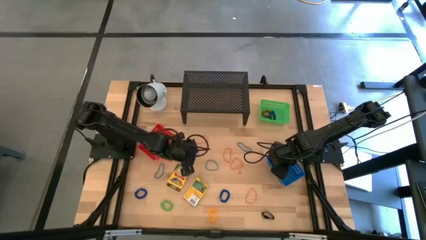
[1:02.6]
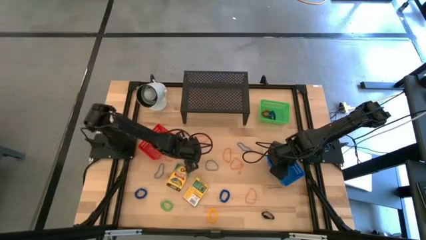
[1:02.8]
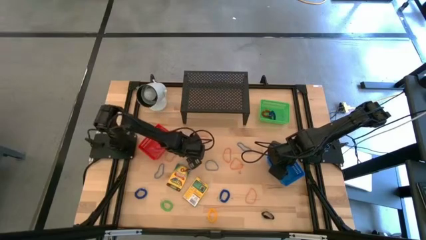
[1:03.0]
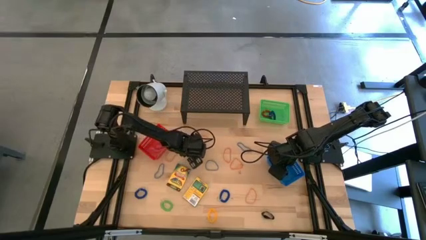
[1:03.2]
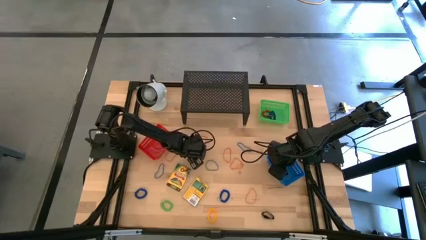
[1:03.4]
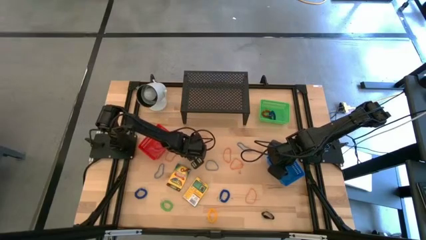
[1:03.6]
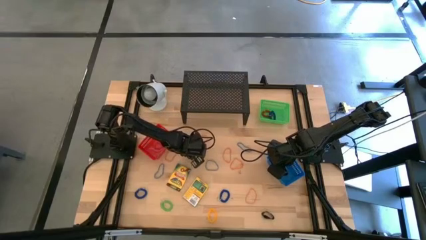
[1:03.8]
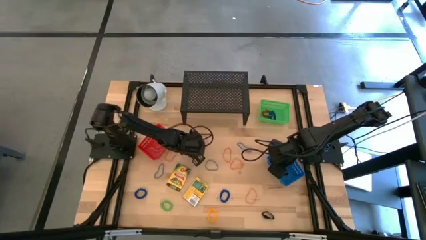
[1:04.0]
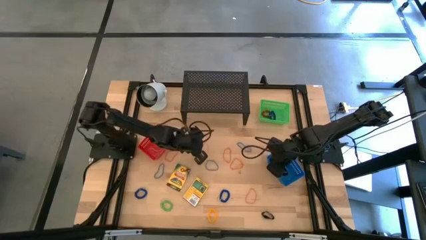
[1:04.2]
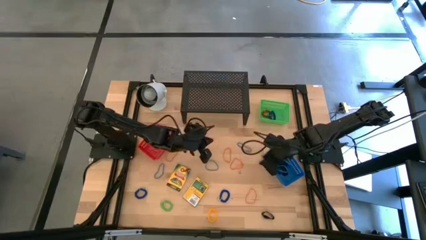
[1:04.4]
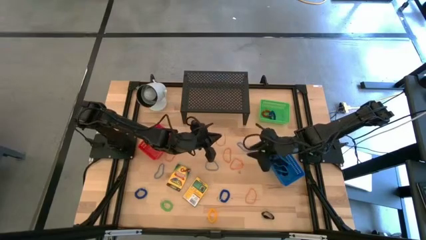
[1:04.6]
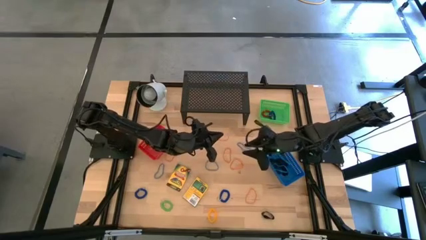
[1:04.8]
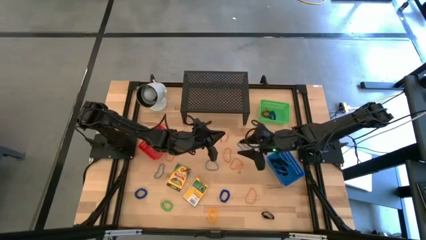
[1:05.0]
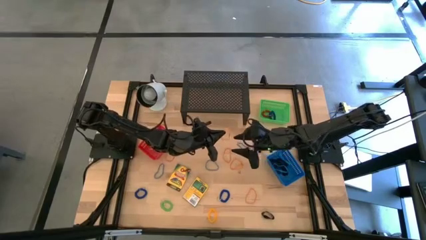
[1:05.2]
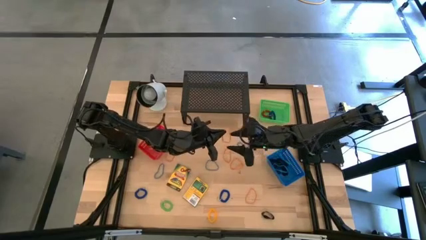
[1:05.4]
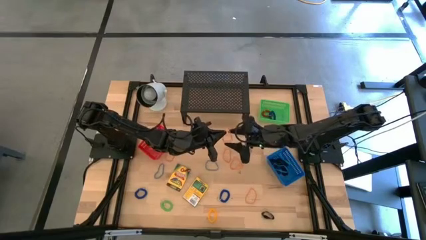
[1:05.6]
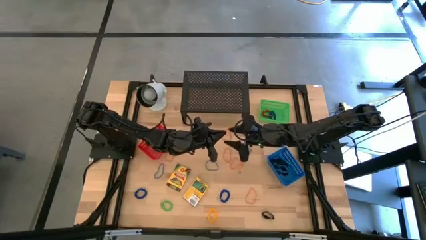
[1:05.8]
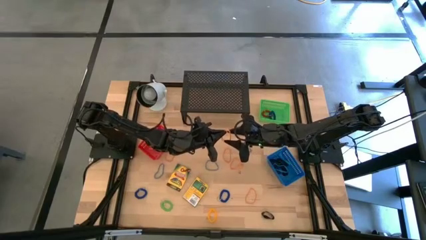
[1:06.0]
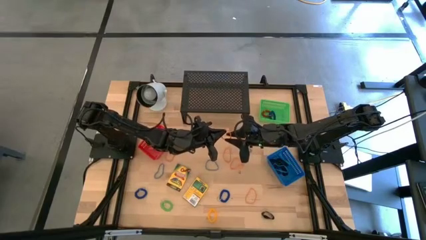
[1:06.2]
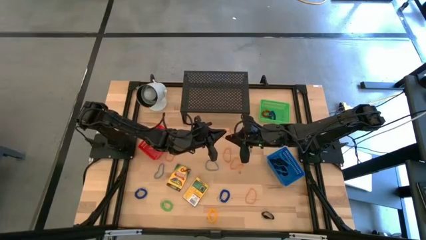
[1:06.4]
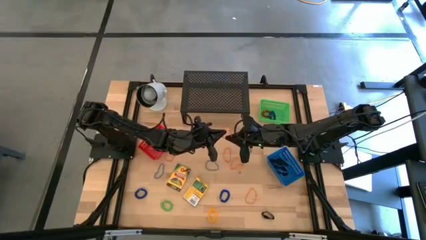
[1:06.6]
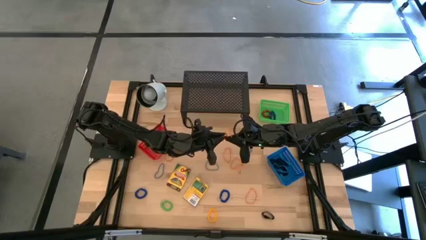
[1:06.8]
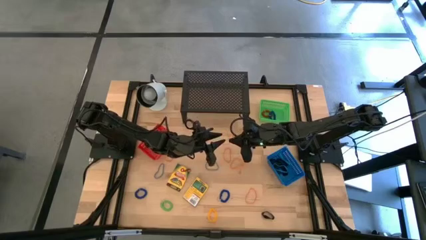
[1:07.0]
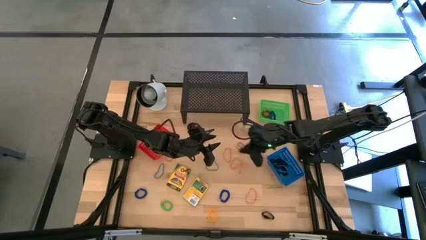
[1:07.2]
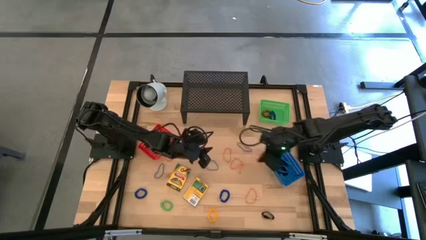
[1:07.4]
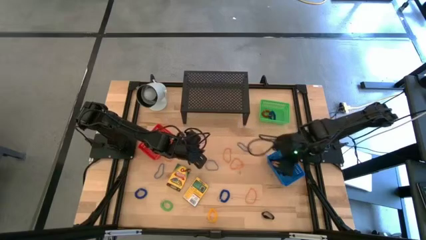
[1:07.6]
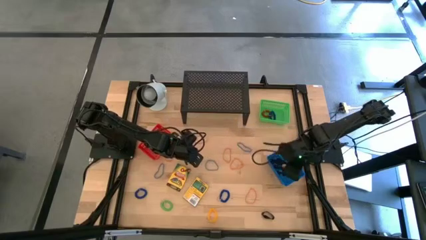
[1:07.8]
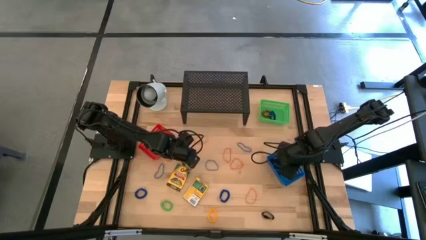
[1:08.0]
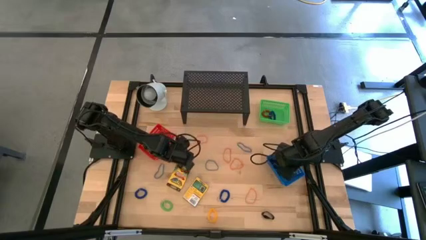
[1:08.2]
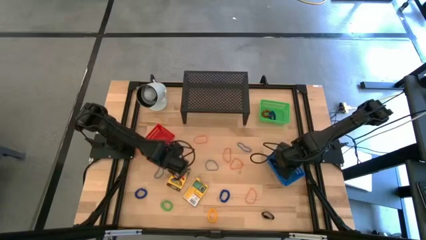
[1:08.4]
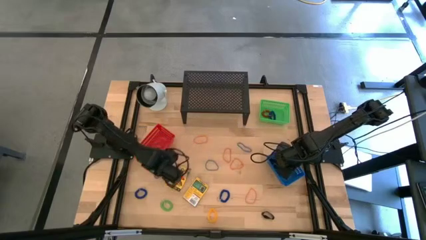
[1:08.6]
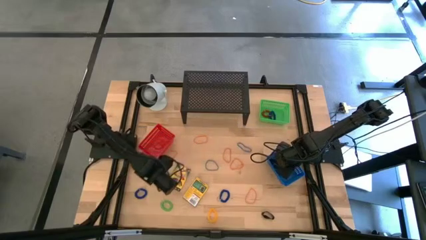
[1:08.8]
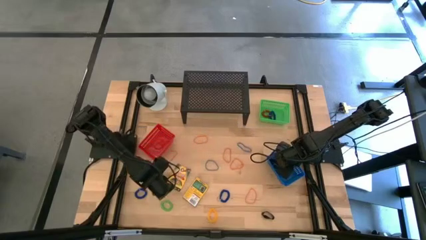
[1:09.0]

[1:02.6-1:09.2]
Task: Pick & Place Office Desk Supplies
Put the orange rubber band into the blue bin

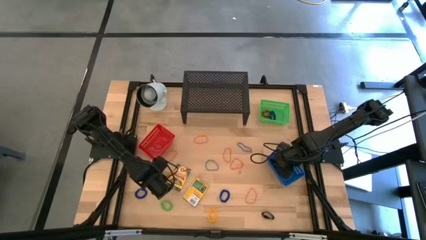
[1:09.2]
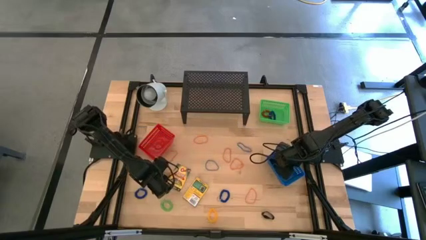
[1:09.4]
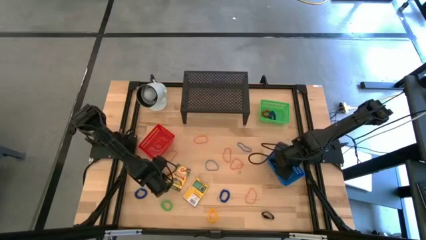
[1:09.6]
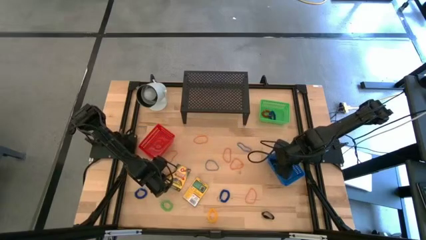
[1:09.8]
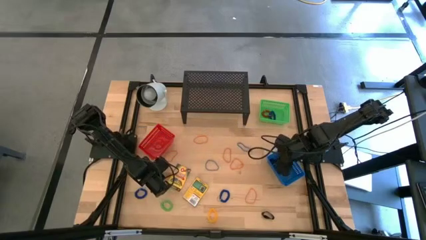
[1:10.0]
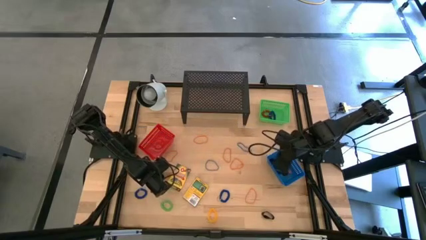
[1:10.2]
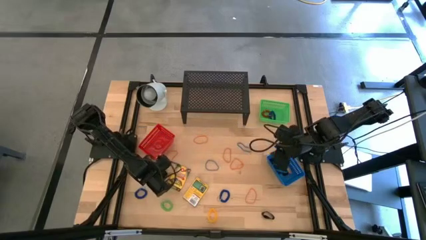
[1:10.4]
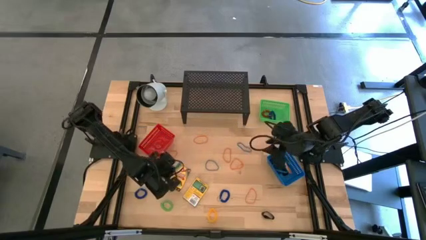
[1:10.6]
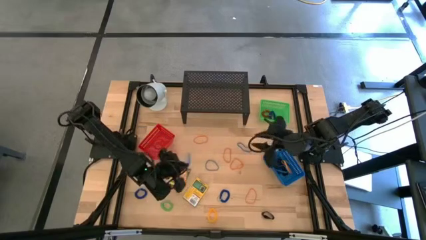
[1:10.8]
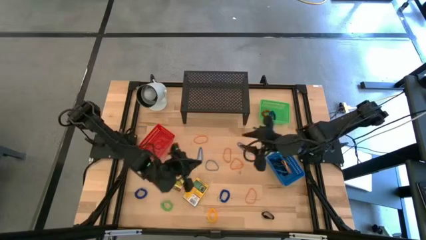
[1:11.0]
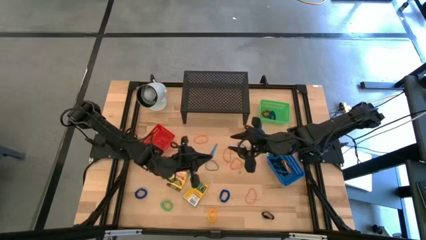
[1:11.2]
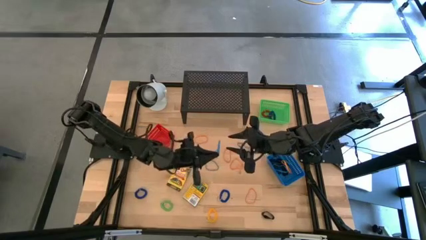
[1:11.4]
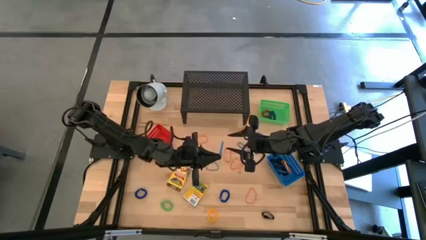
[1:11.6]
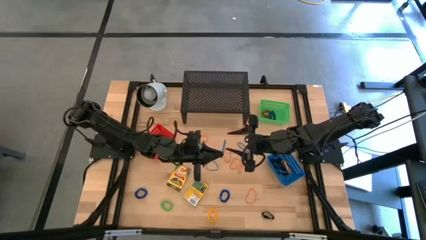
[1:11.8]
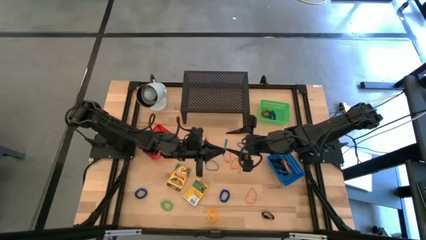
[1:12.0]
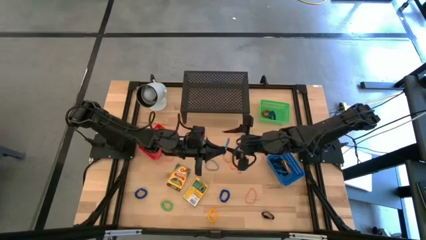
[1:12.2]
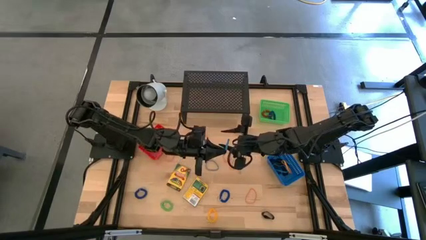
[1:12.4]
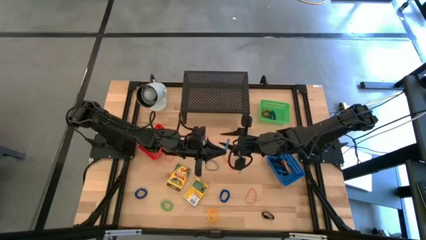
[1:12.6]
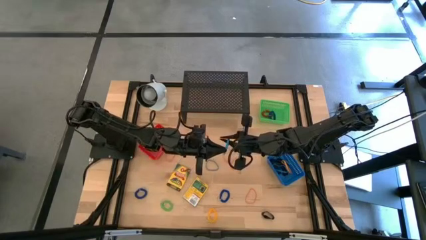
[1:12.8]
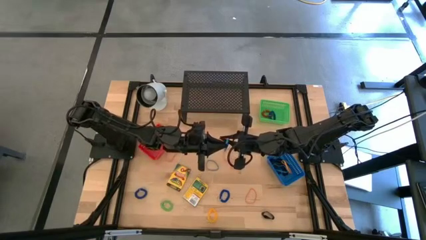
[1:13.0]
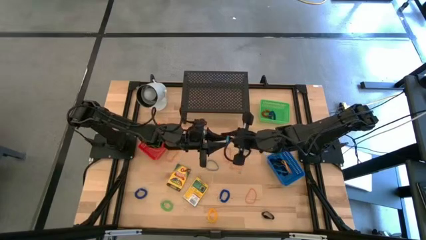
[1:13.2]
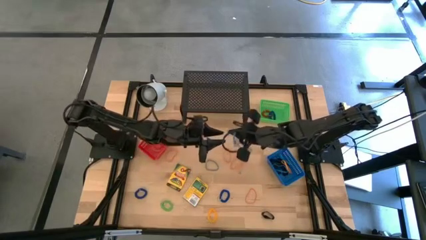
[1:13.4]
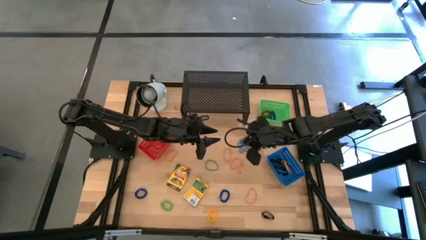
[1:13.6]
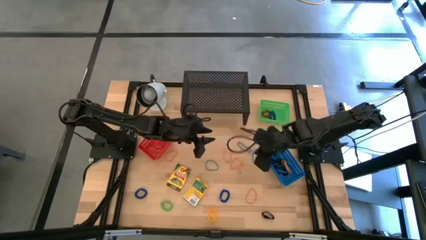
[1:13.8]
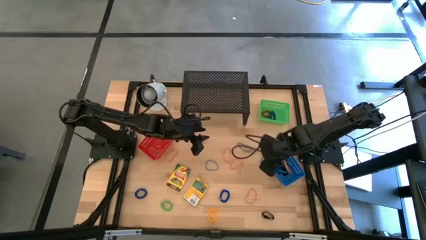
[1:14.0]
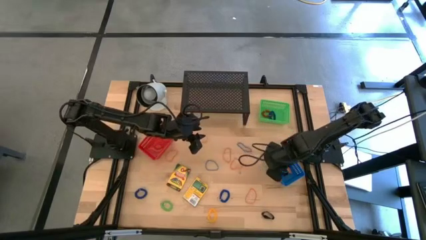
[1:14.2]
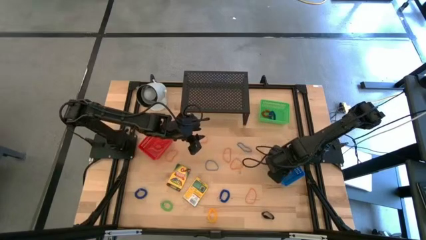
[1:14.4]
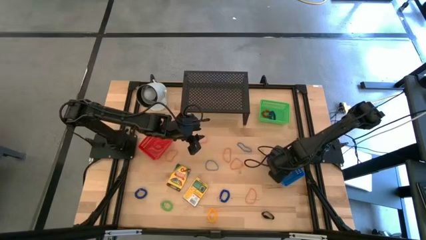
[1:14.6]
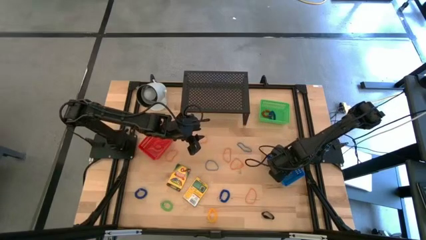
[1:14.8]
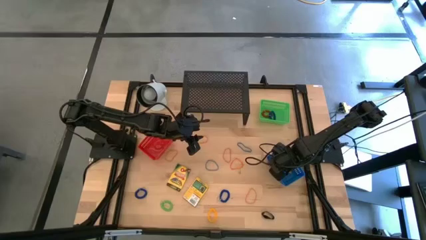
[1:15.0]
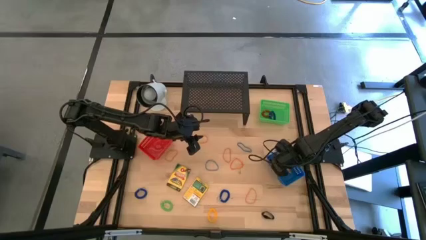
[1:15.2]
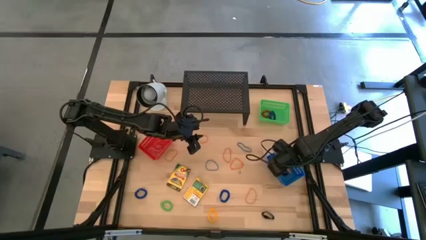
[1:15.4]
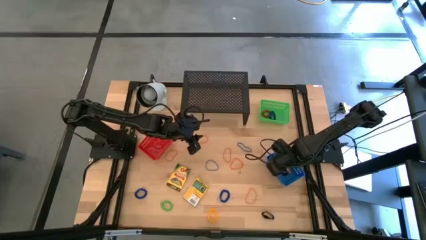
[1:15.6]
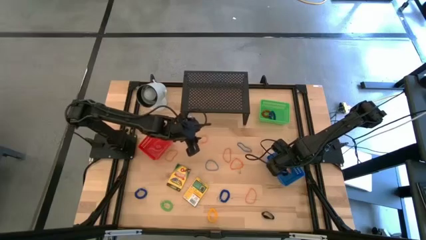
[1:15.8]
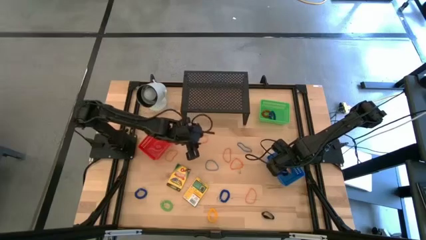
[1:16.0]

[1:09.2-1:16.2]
Put the blue rubber band into the blue bin
